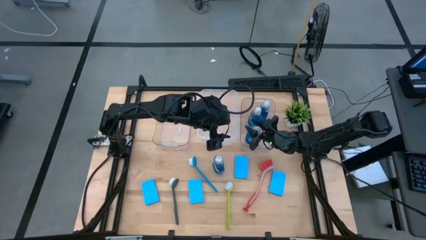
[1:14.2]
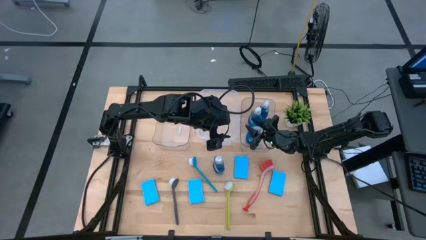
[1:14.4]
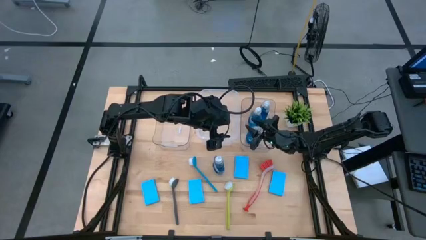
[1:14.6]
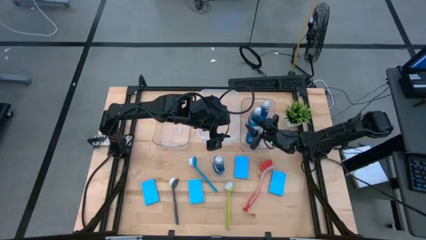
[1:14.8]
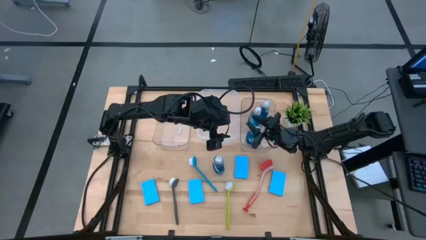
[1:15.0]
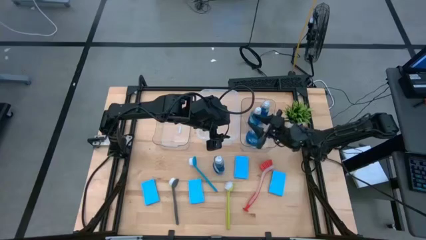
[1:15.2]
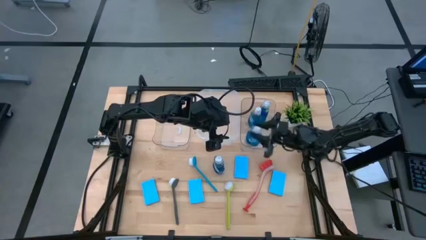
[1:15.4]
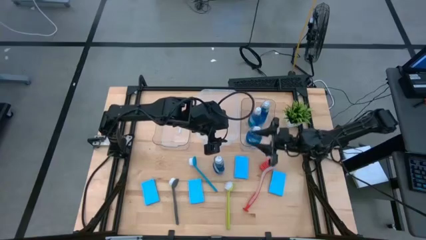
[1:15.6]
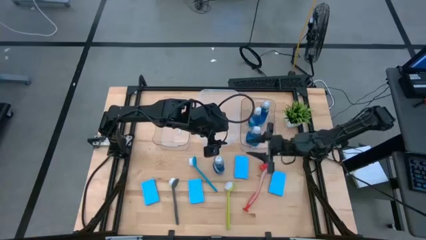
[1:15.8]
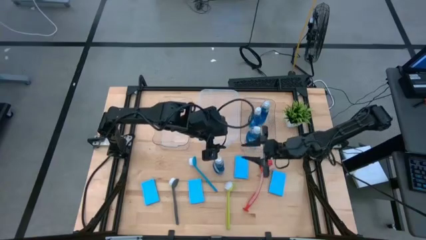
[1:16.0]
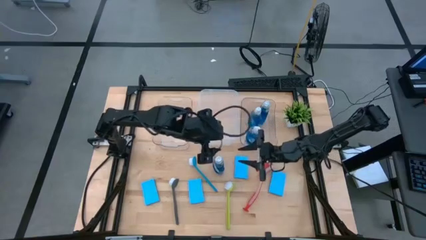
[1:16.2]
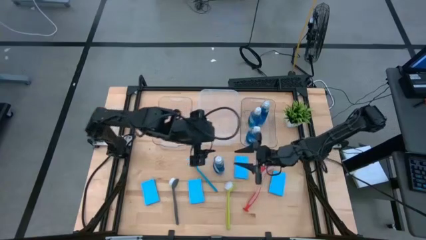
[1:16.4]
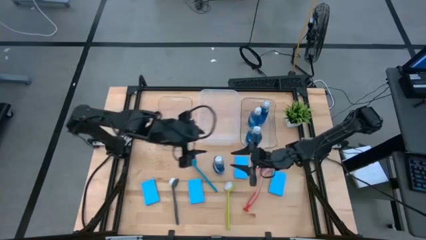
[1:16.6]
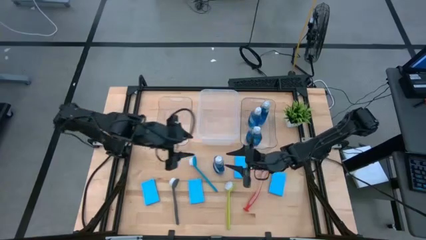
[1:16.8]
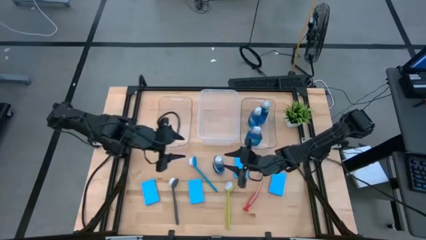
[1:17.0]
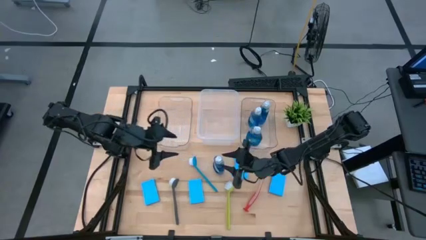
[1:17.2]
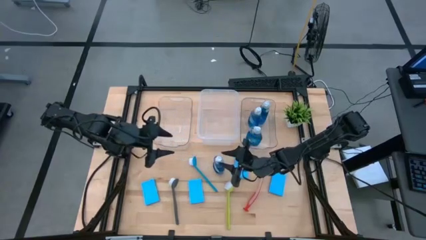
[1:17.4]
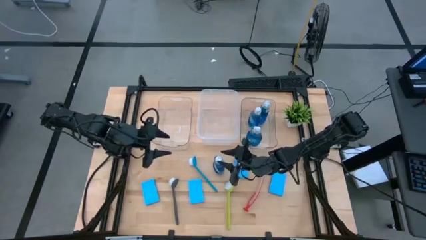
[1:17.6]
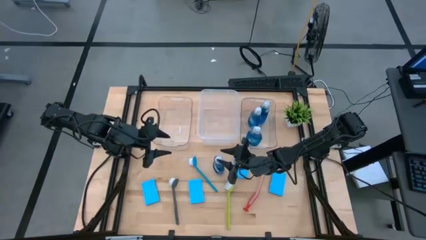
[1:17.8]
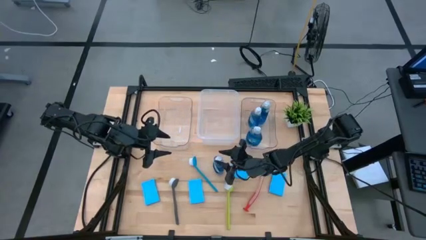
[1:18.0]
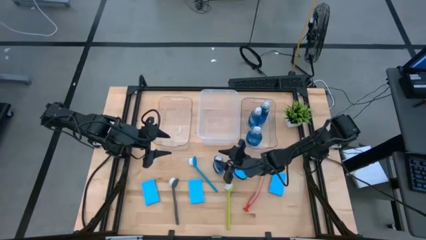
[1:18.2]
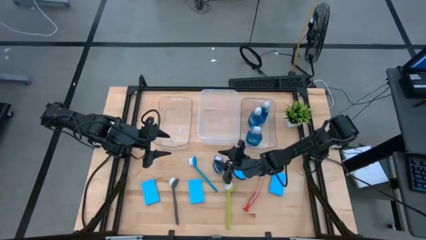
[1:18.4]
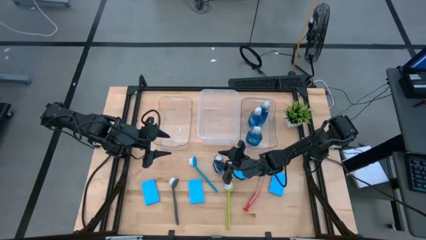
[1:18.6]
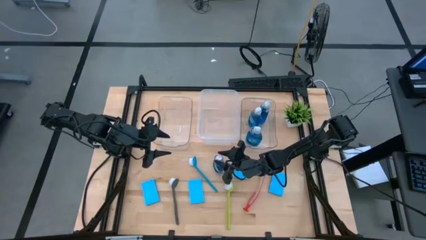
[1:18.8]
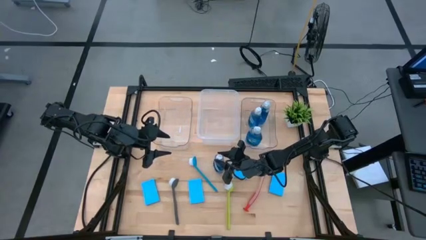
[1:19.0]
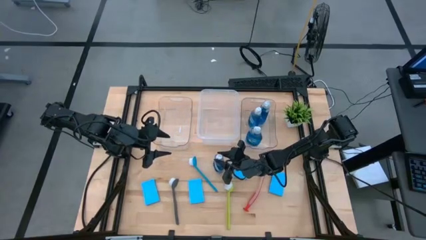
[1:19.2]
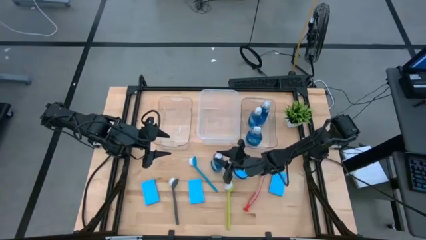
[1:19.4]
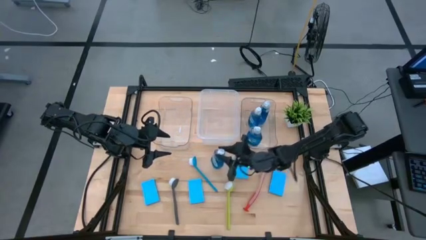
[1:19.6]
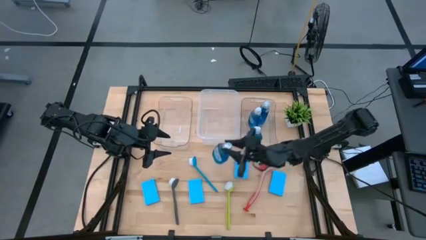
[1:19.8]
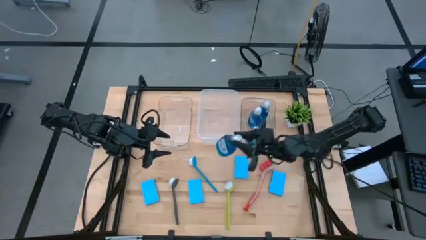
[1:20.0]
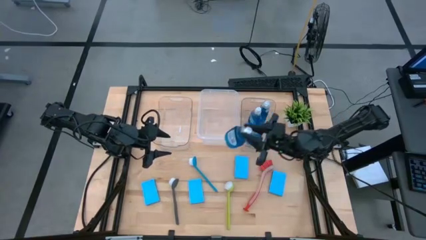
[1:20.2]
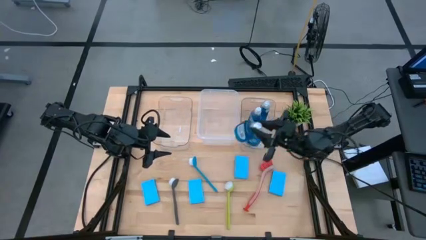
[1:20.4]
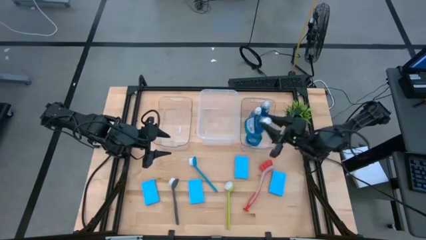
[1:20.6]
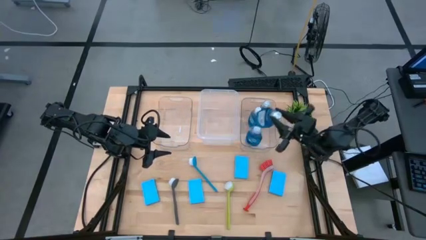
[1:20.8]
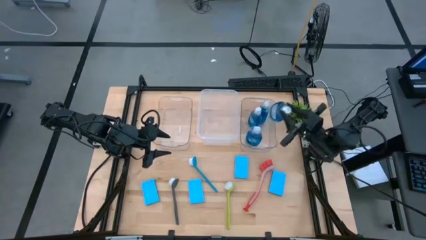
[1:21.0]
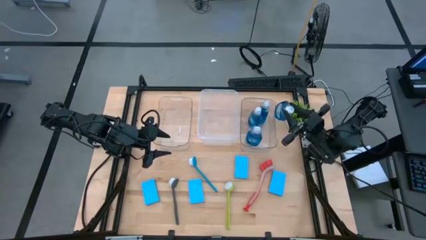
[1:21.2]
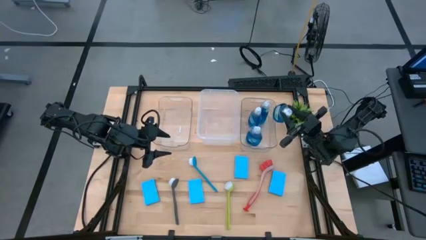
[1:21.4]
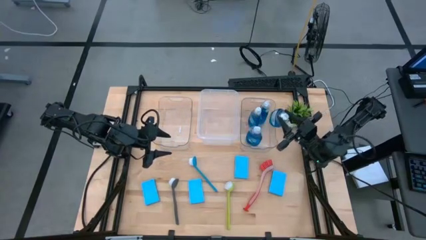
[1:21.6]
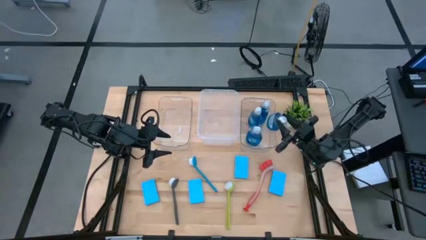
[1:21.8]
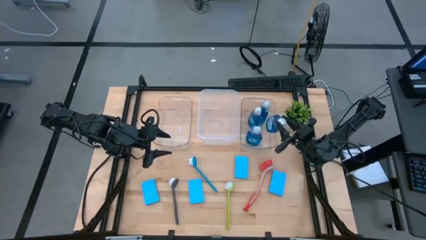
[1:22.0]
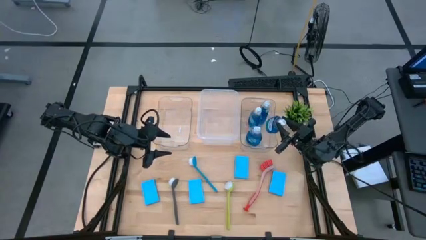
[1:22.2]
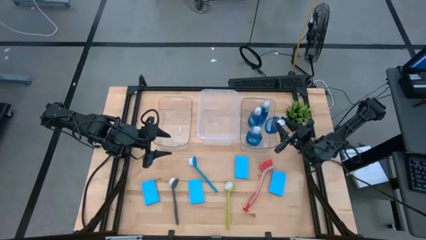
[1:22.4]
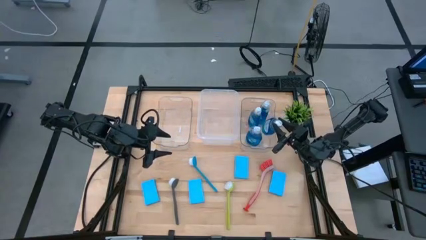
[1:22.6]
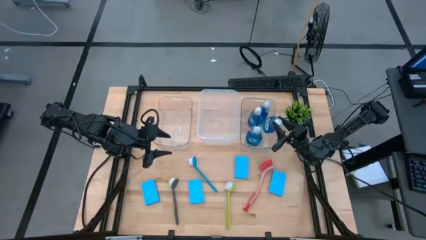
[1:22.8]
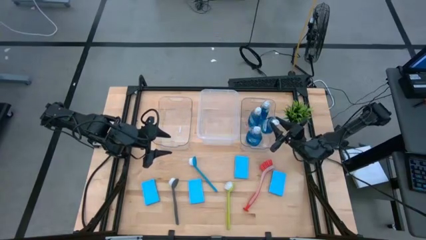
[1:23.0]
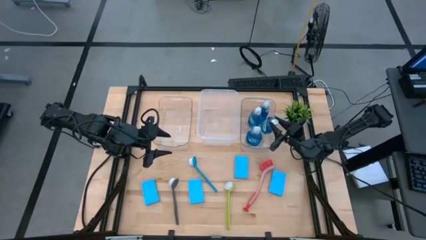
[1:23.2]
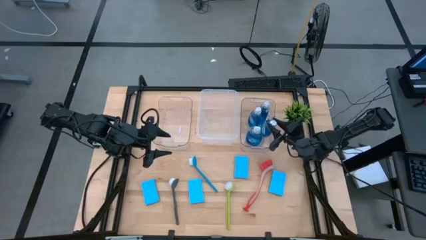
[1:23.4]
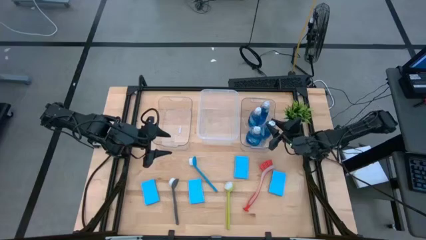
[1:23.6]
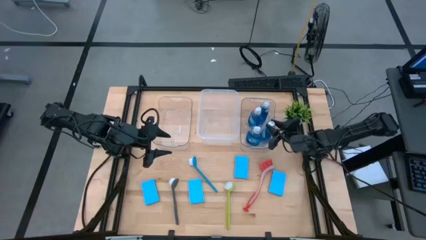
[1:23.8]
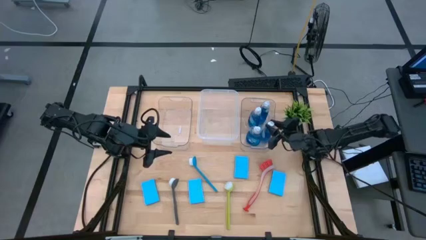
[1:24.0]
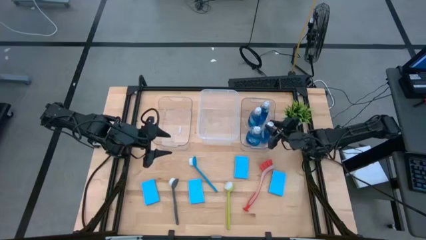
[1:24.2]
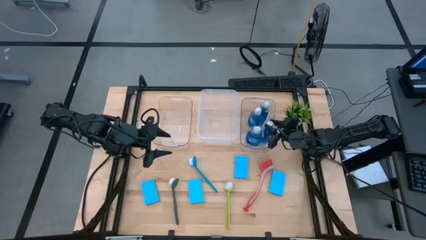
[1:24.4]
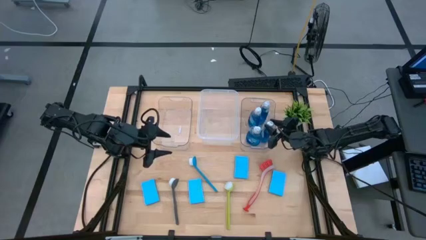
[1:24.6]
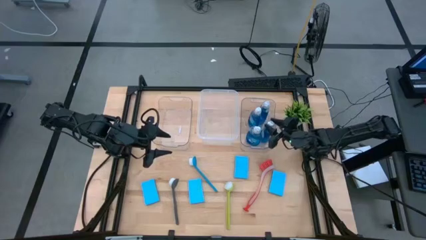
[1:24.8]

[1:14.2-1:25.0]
Task: Pick & Place Kitchen Sink Supplies
Put the blue dishwashing liquid into the right transparent bin
